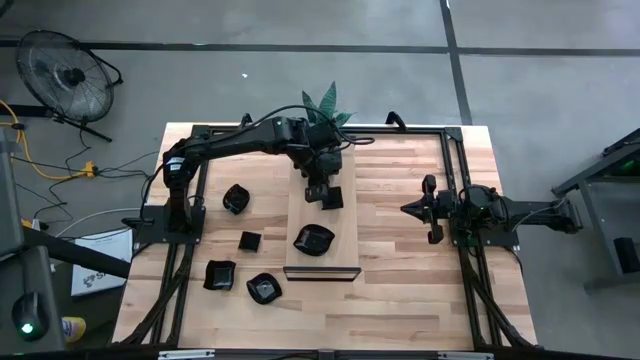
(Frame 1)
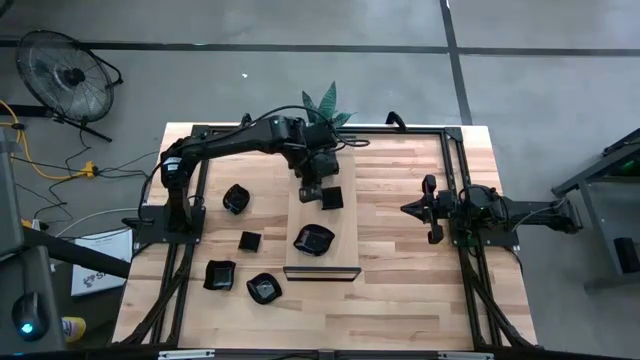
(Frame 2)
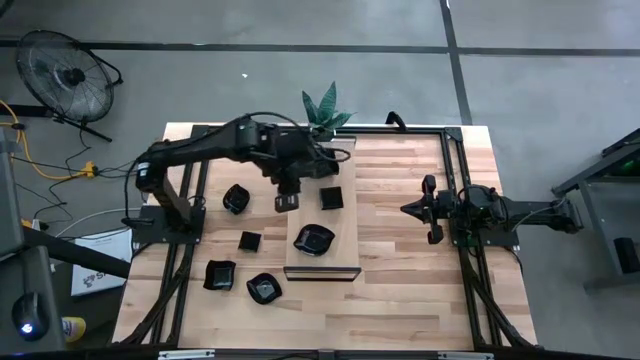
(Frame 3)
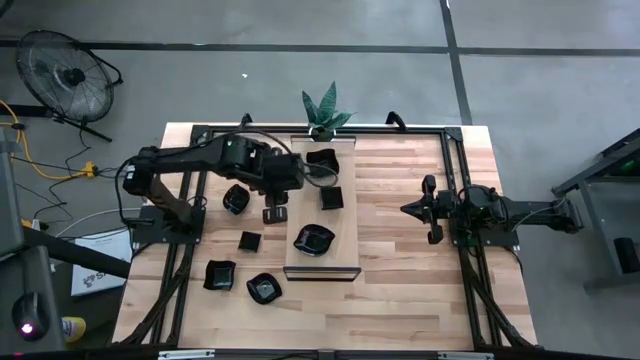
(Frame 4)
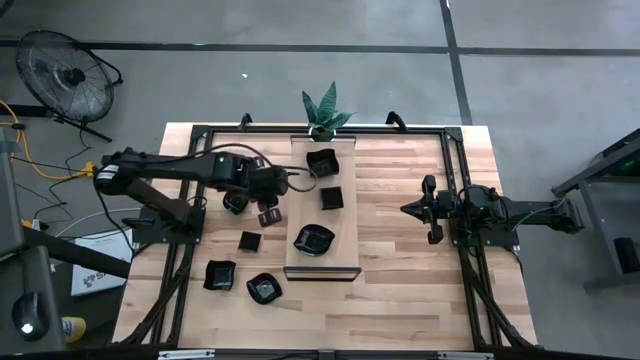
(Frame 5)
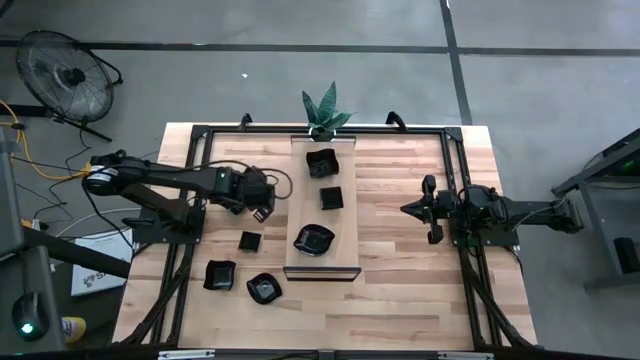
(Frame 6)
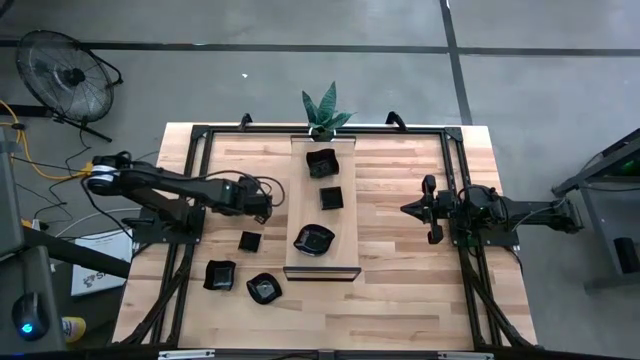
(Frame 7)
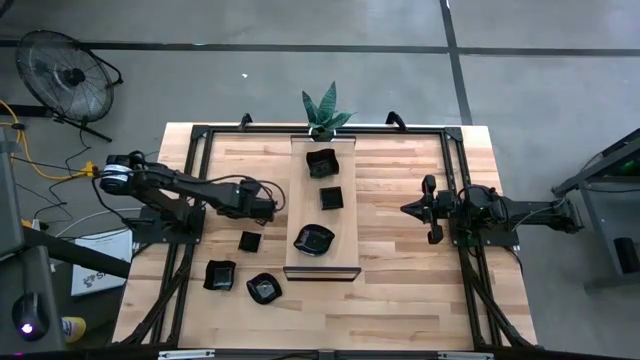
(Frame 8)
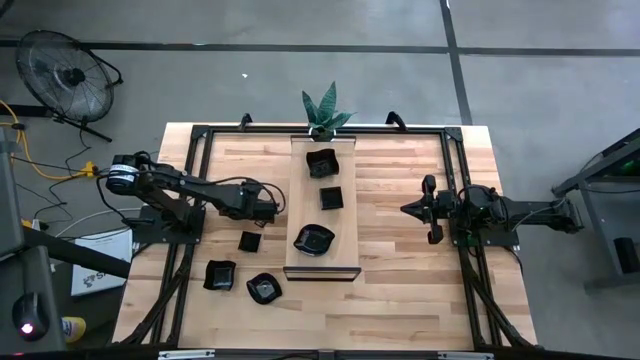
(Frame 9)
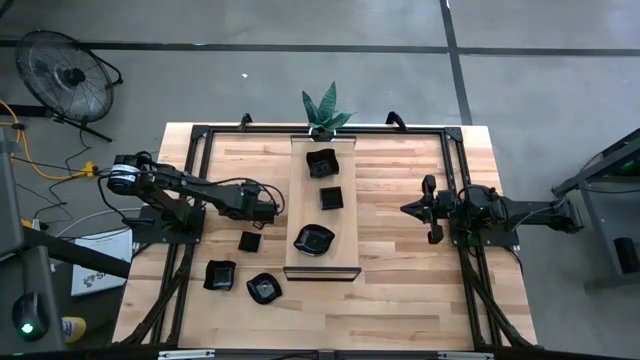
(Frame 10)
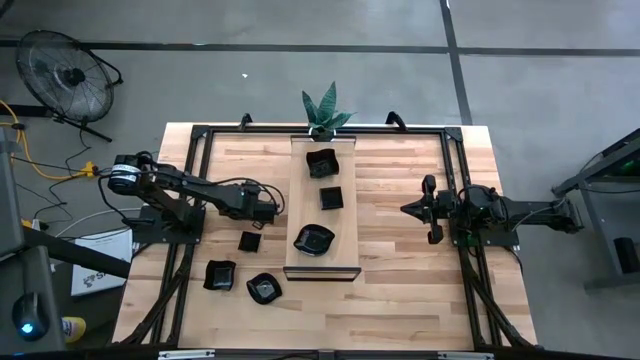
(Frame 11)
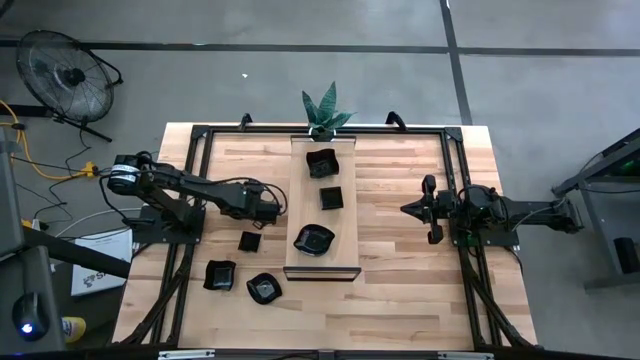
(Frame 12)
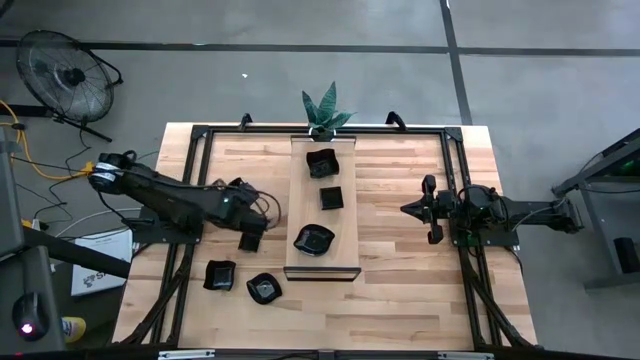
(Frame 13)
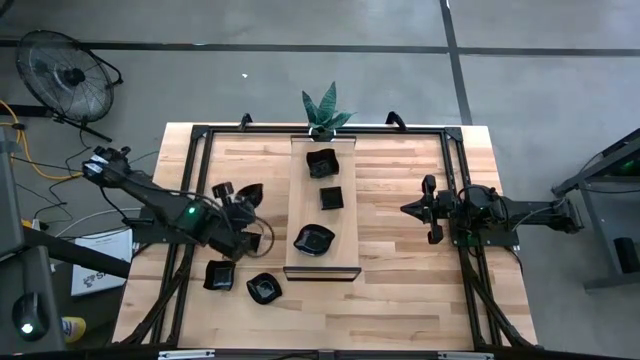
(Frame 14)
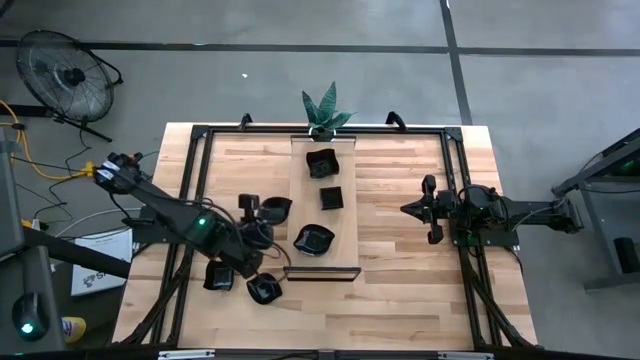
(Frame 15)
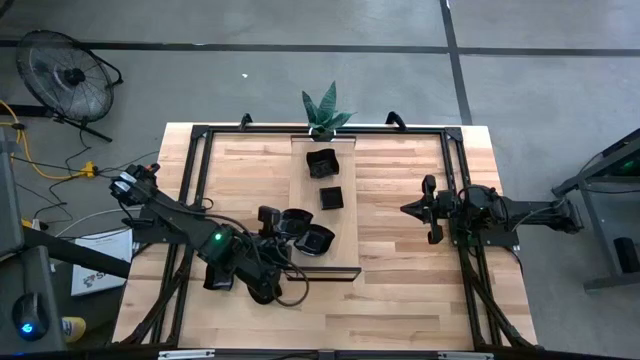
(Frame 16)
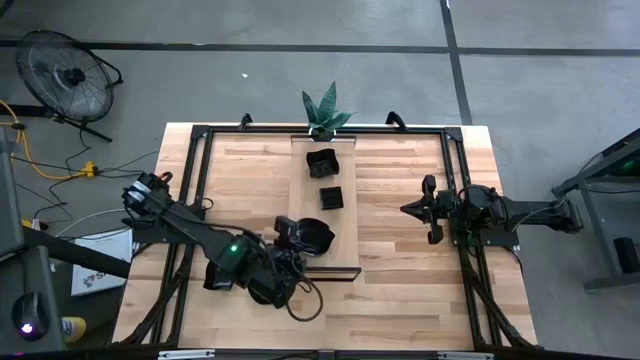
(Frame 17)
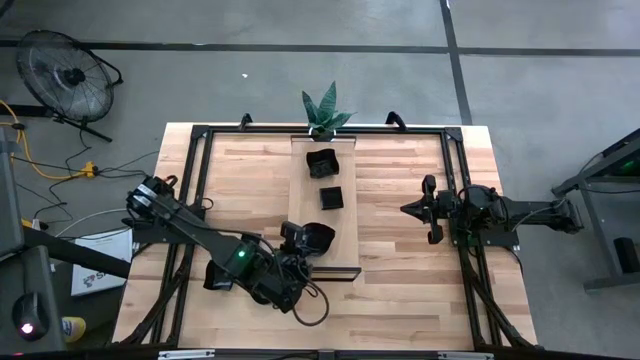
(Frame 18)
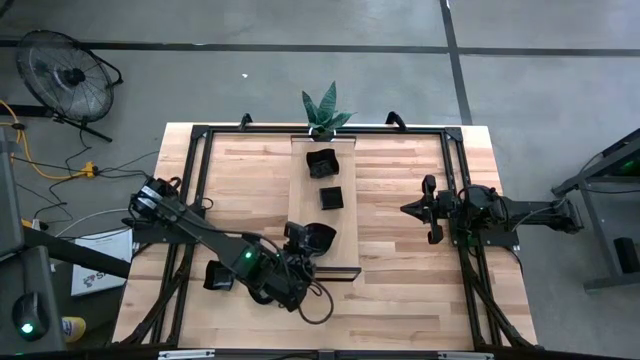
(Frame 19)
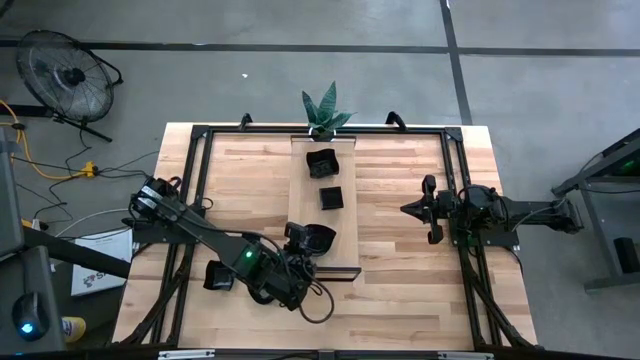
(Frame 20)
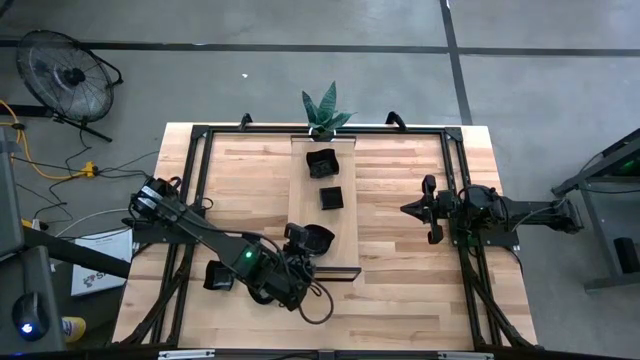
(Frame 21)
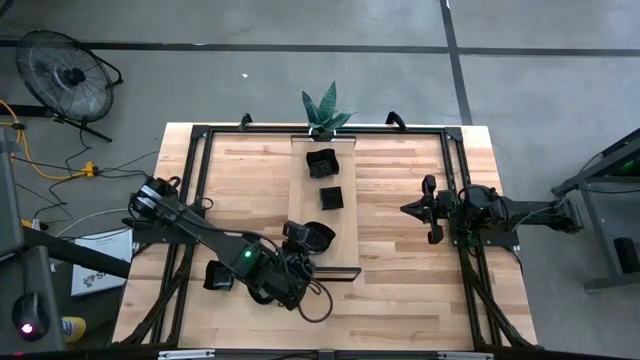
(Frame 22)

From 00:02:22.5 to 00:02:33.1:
Task: Pick & Place Mini shaped plates
Stack the black leaf shaped plate on top of the black leaf shaped plate on the shelf

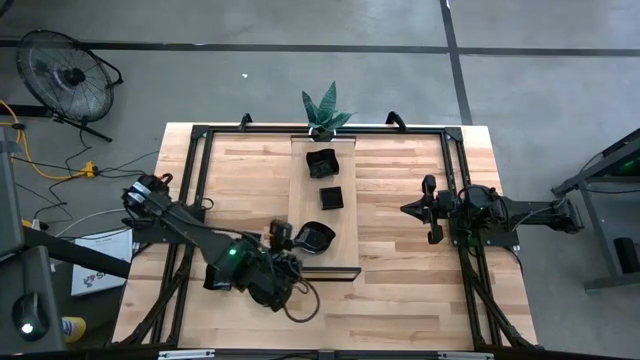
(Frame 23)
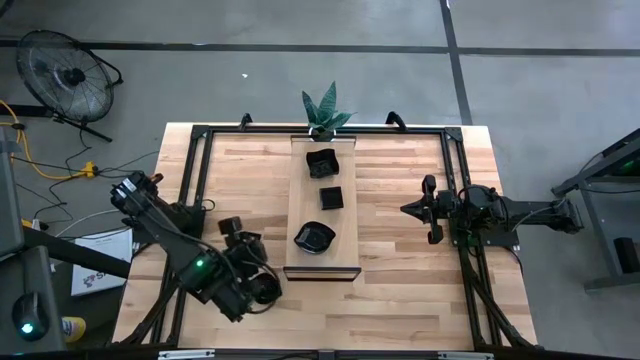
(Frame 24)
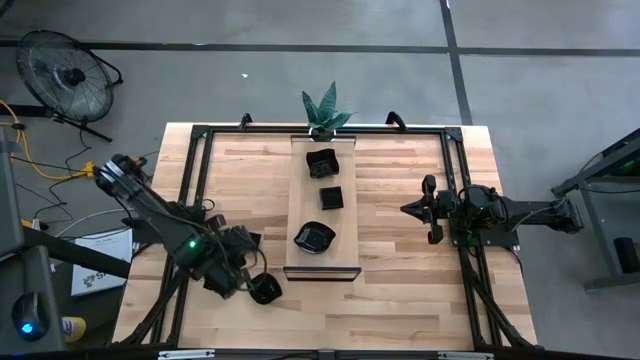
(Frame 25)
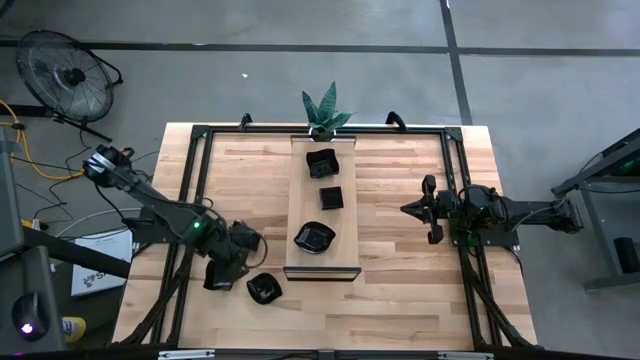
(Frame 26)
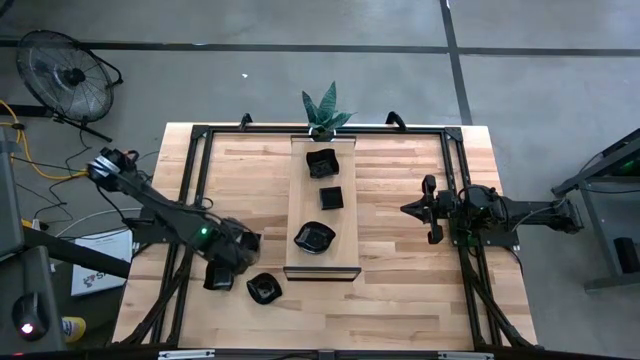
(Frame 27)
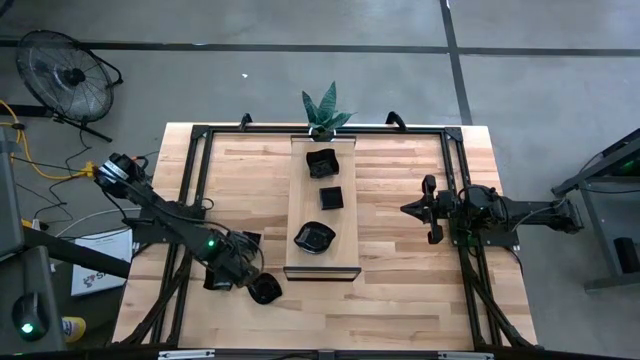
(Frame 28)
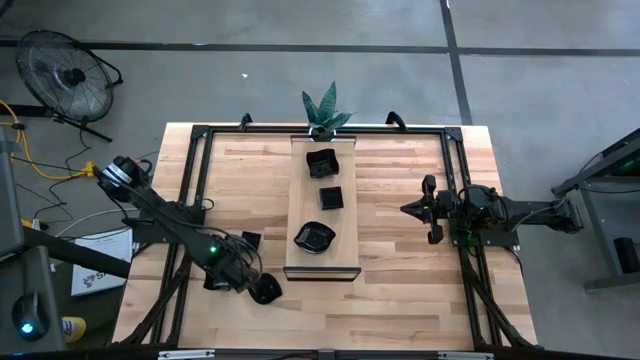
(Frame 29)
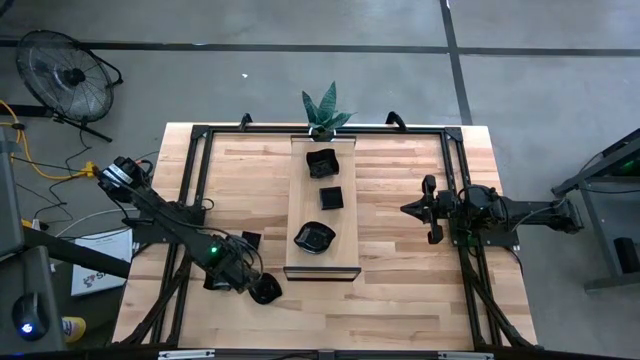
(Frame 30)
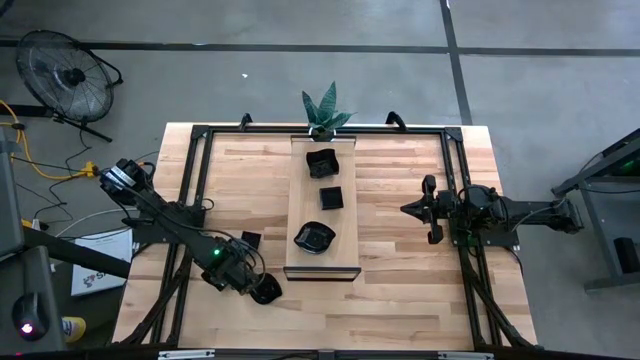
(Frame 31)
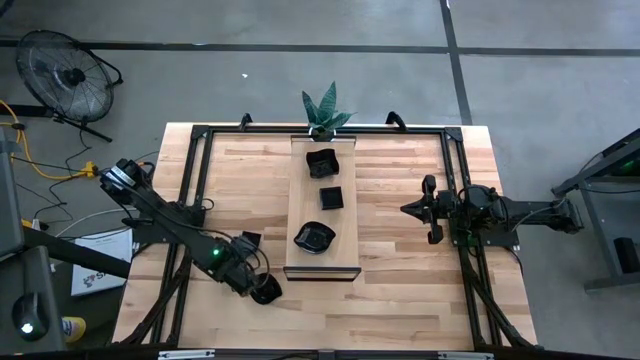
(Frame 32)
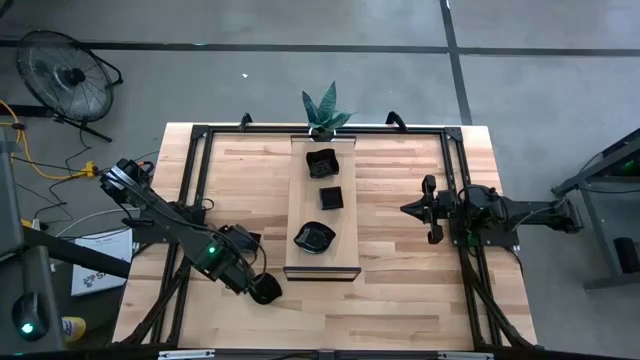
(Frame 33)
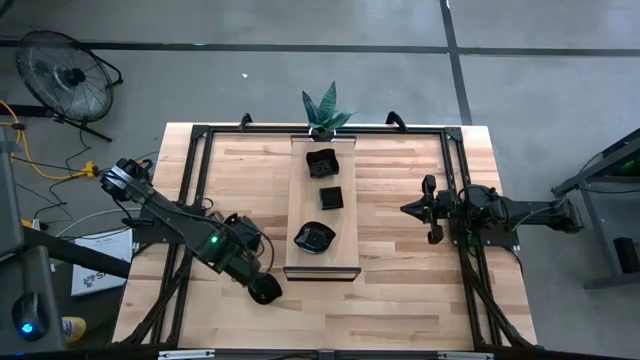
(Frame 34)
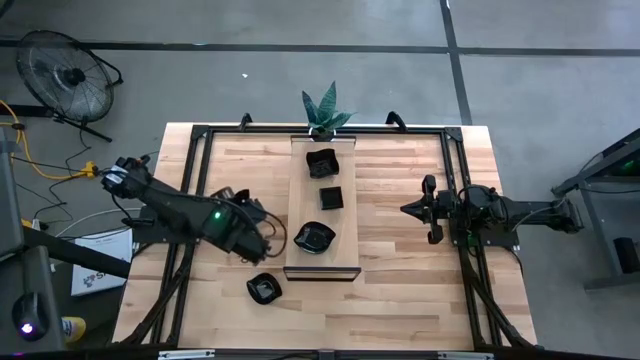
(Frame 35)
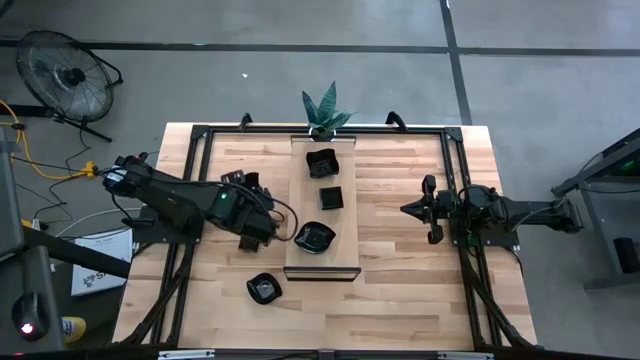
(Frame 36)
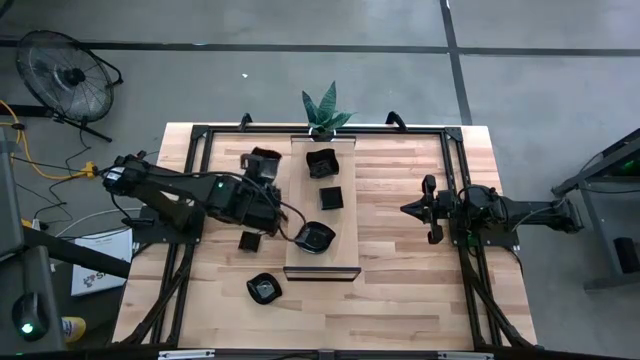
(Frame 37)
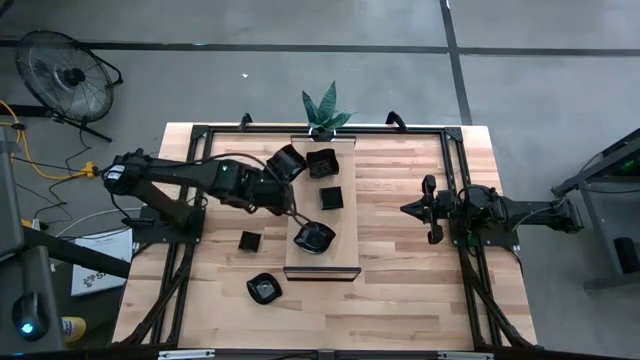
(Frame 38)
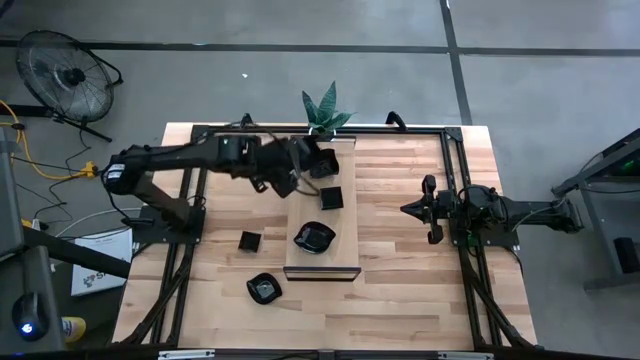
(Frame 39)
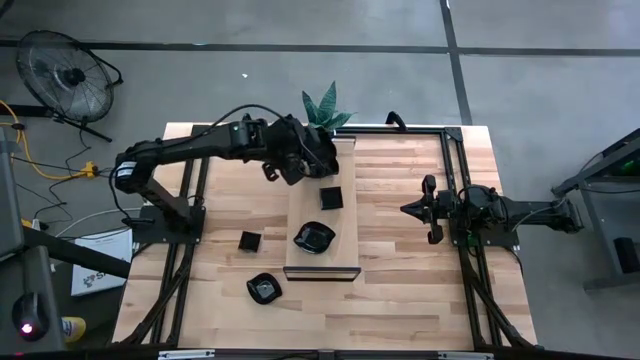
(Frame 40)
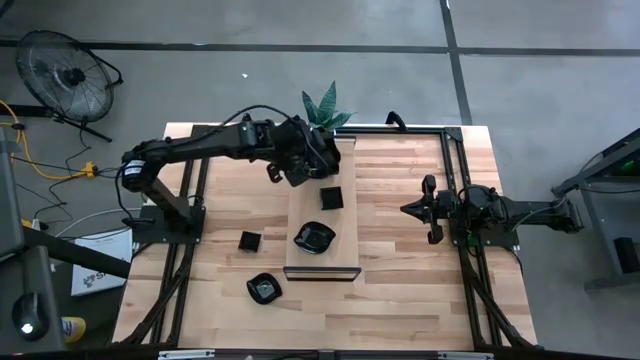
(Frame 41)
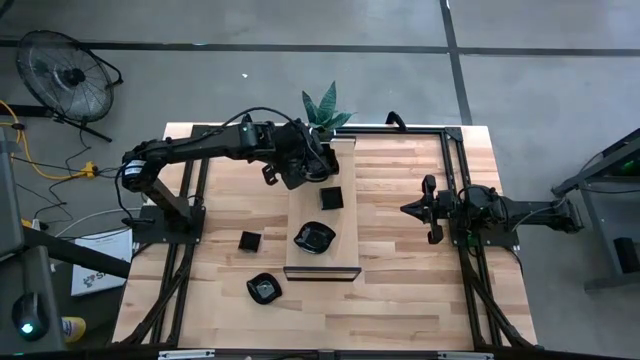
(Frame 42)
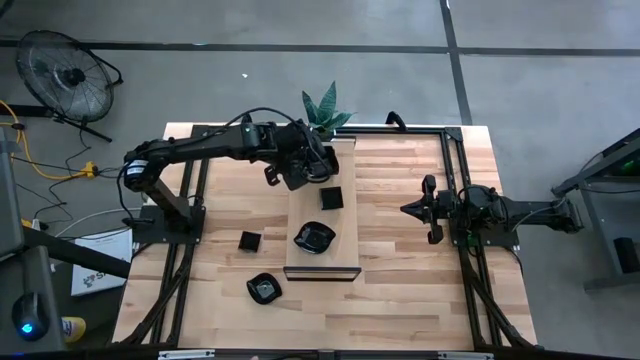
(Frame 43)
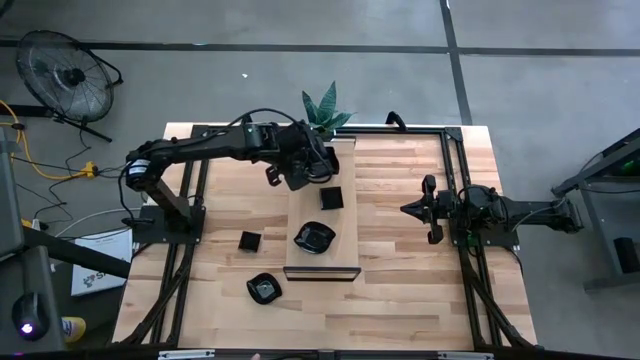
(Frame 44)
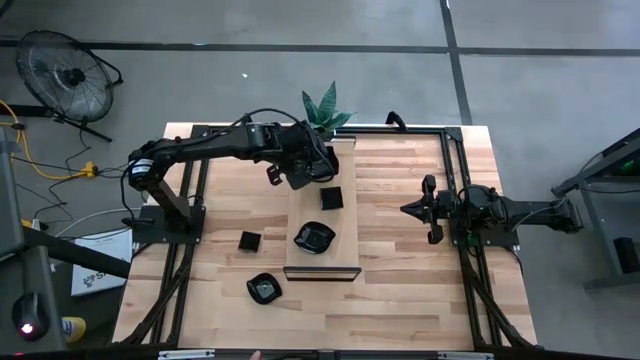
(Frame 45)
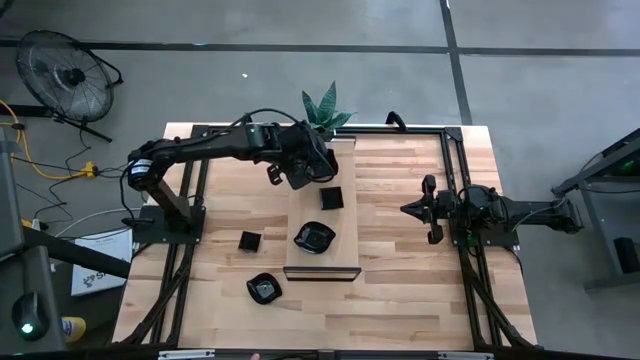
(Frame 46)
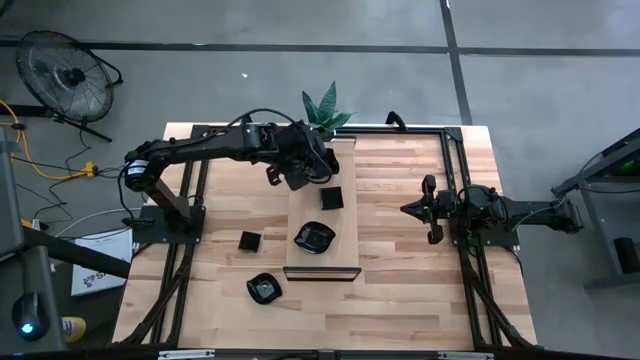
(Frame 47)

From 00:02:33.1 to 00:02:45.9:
Stack the black distorted square plate on top of the black distorted square plate on the shelf
